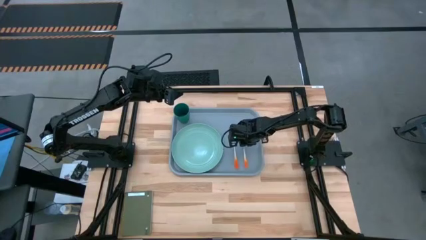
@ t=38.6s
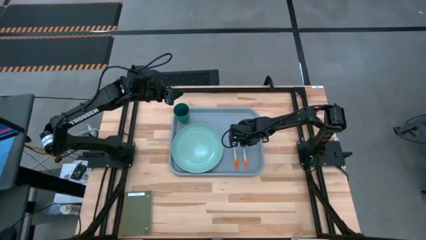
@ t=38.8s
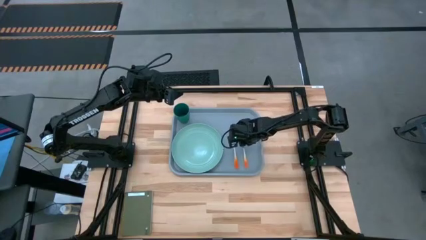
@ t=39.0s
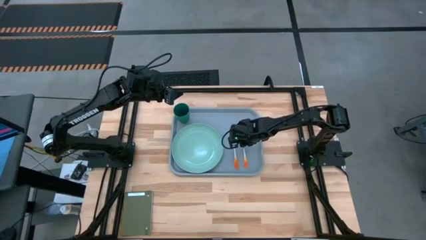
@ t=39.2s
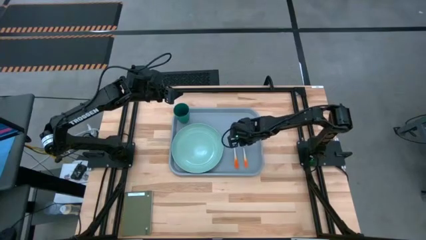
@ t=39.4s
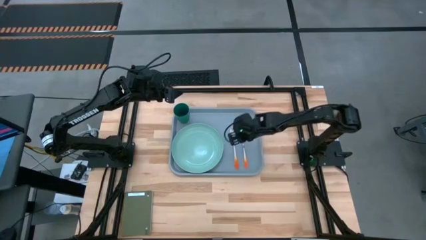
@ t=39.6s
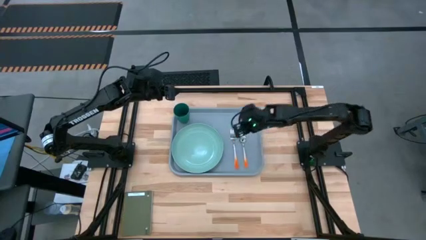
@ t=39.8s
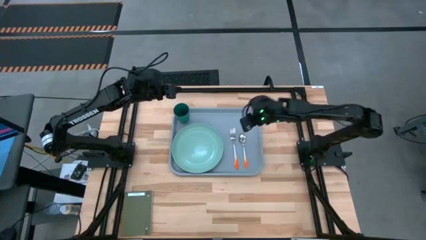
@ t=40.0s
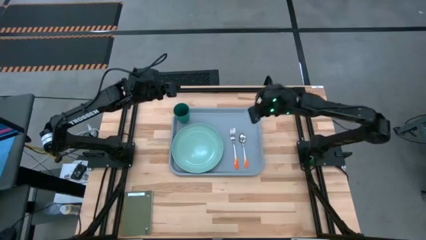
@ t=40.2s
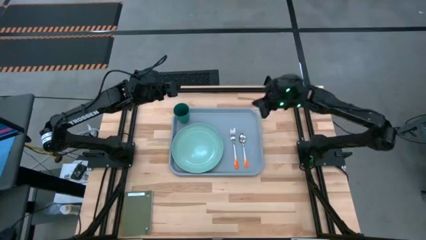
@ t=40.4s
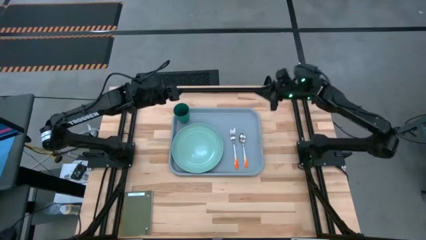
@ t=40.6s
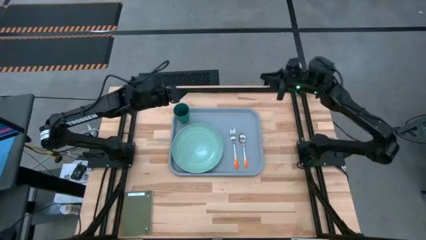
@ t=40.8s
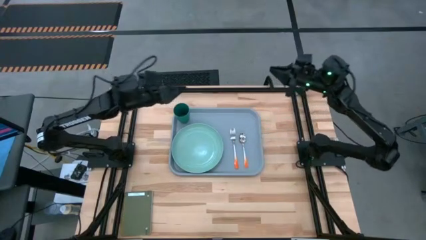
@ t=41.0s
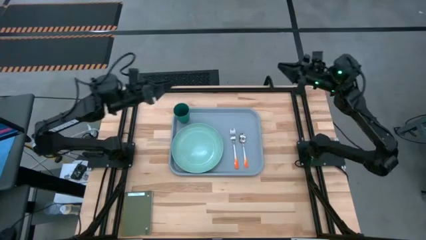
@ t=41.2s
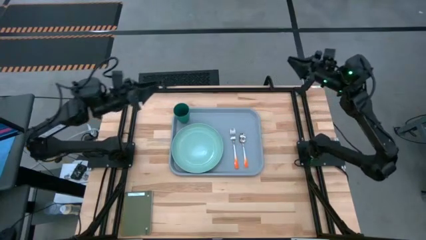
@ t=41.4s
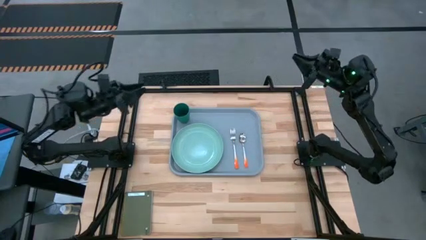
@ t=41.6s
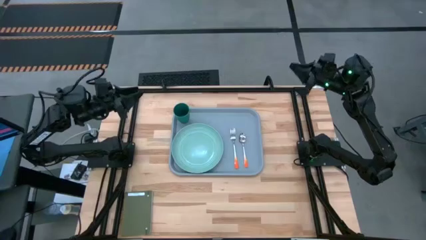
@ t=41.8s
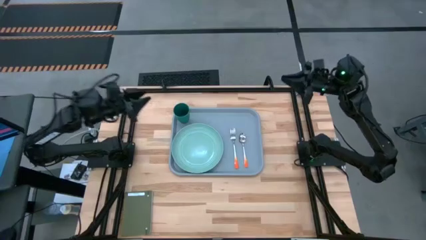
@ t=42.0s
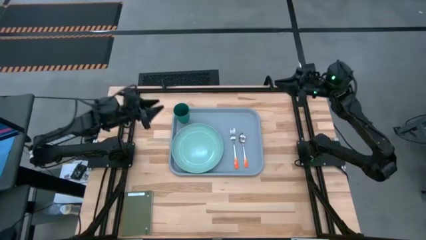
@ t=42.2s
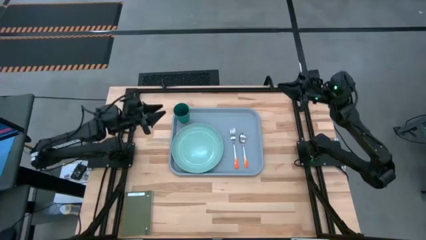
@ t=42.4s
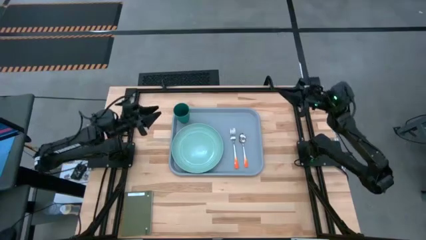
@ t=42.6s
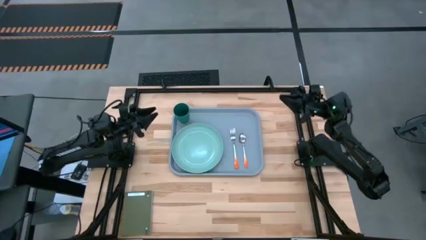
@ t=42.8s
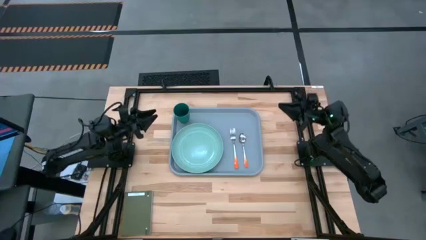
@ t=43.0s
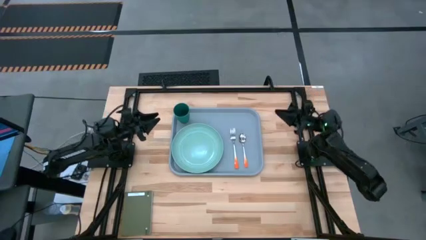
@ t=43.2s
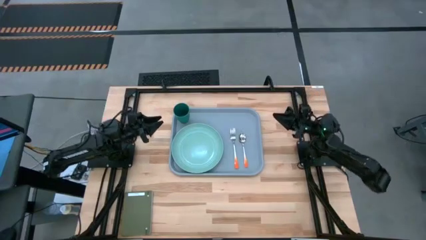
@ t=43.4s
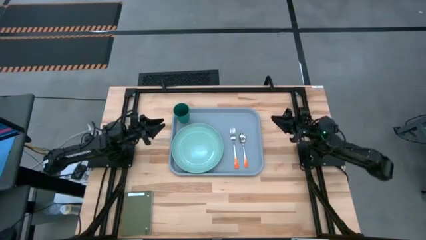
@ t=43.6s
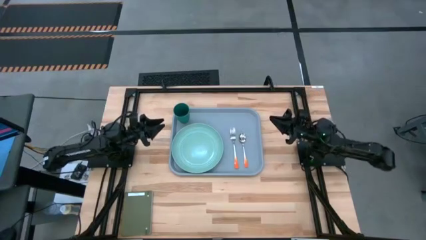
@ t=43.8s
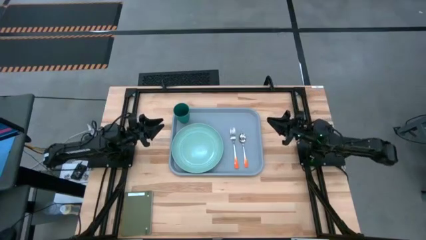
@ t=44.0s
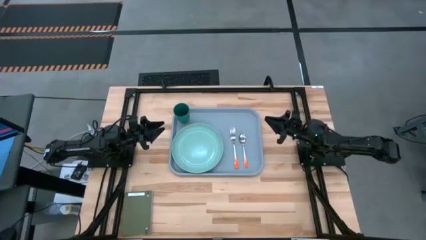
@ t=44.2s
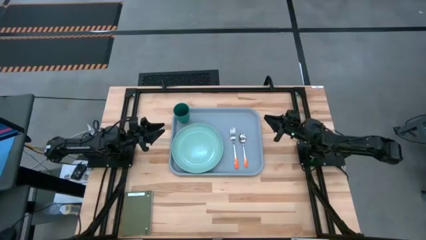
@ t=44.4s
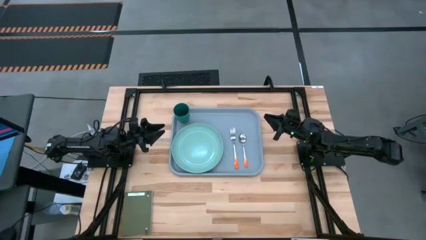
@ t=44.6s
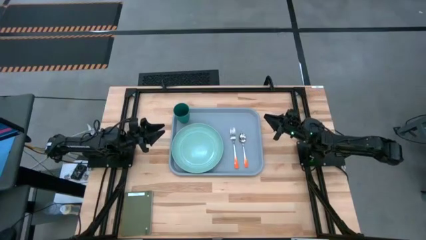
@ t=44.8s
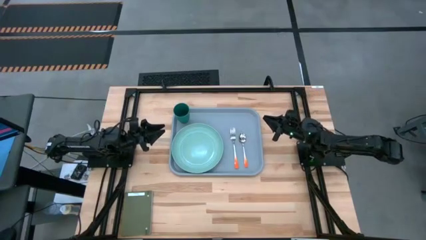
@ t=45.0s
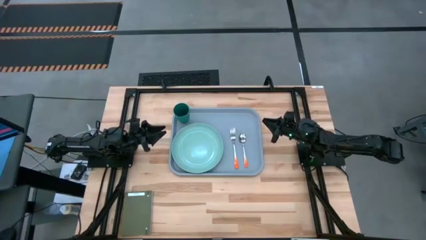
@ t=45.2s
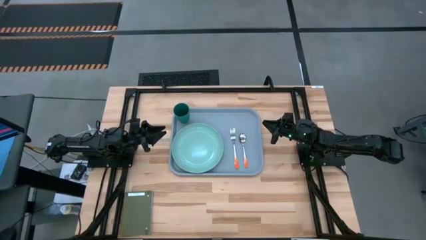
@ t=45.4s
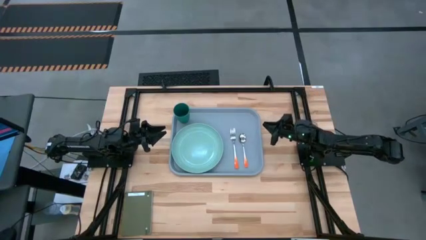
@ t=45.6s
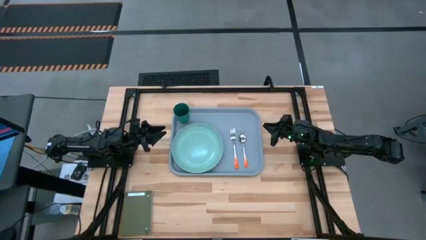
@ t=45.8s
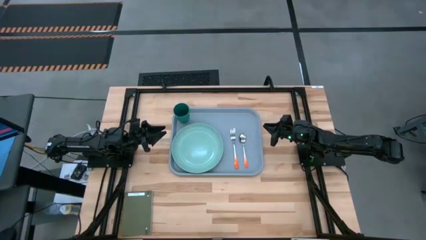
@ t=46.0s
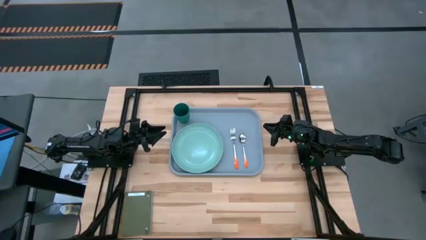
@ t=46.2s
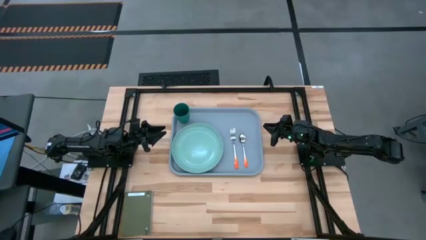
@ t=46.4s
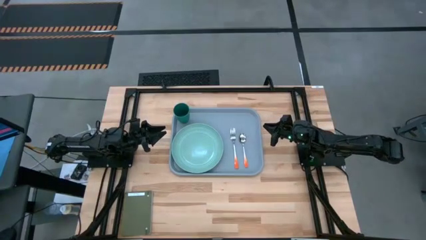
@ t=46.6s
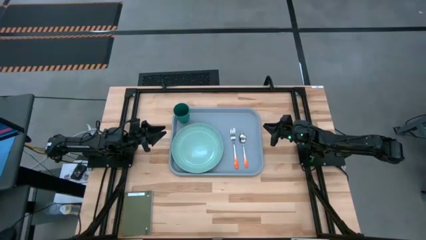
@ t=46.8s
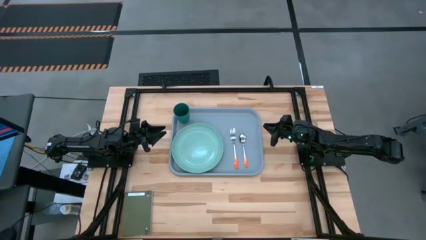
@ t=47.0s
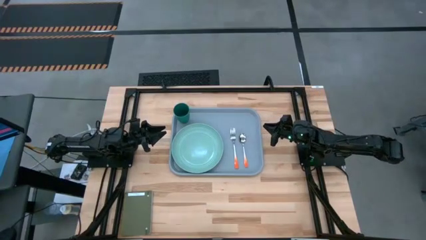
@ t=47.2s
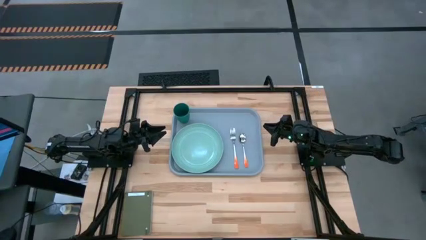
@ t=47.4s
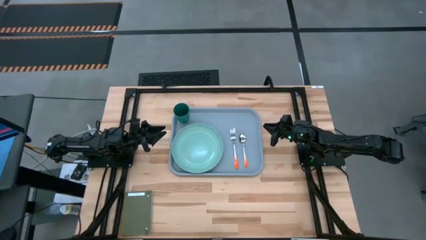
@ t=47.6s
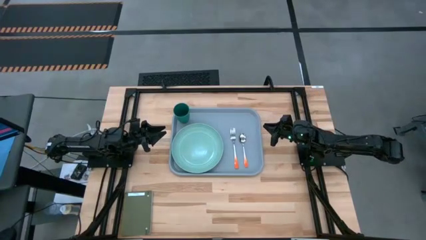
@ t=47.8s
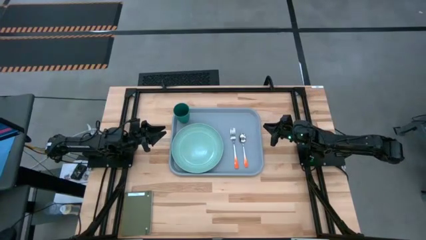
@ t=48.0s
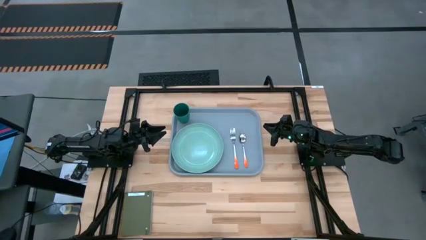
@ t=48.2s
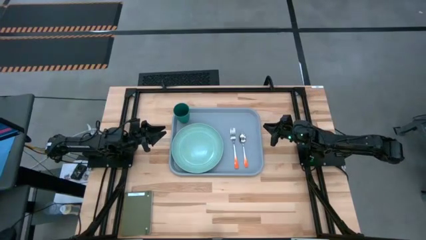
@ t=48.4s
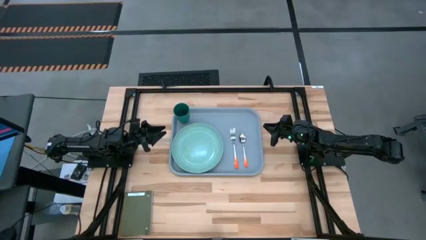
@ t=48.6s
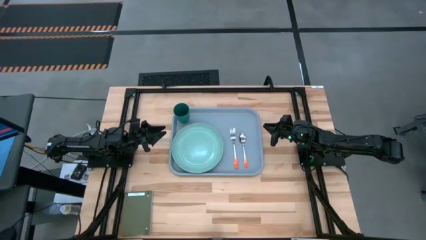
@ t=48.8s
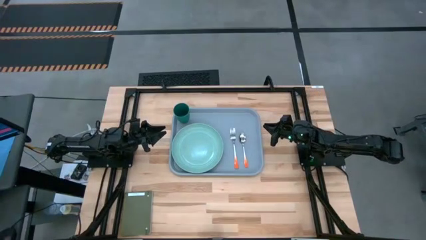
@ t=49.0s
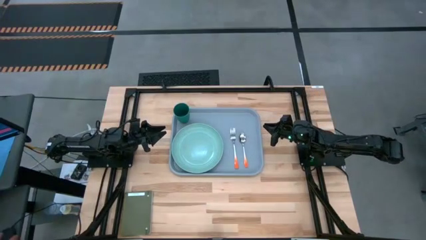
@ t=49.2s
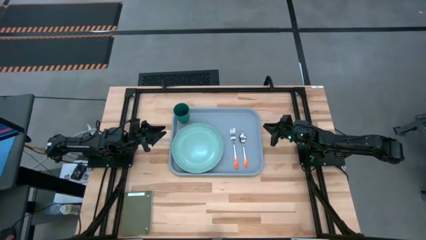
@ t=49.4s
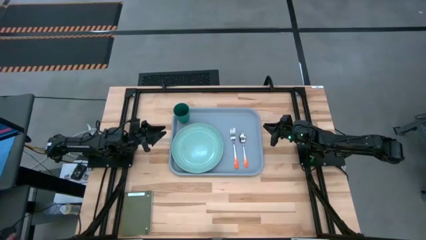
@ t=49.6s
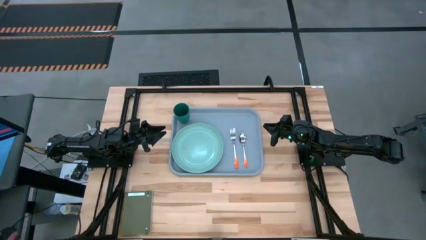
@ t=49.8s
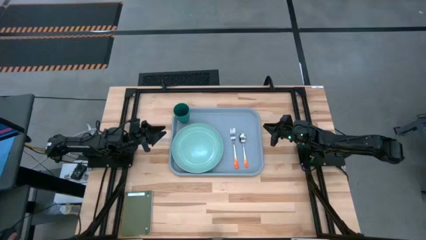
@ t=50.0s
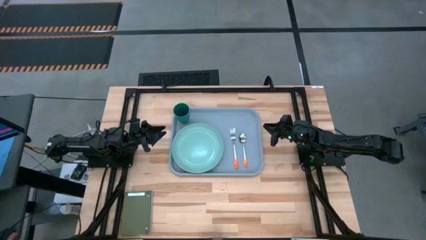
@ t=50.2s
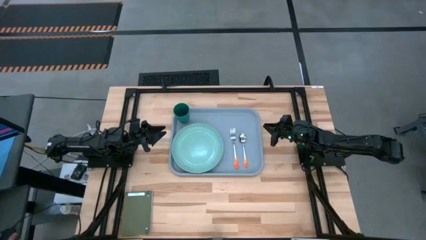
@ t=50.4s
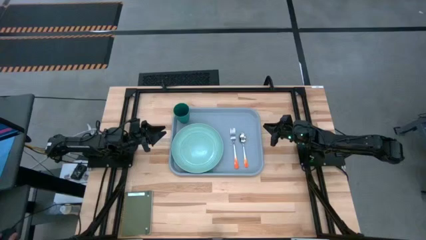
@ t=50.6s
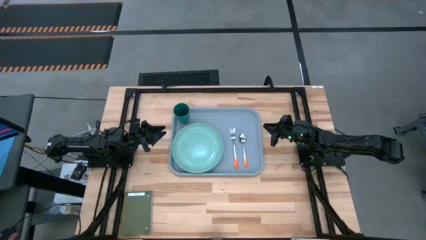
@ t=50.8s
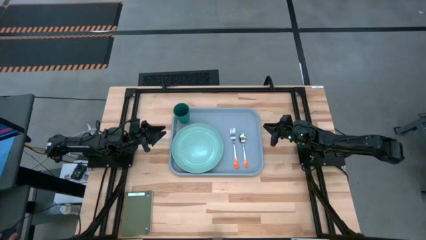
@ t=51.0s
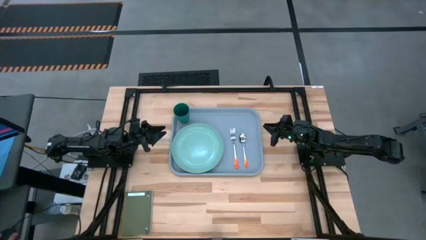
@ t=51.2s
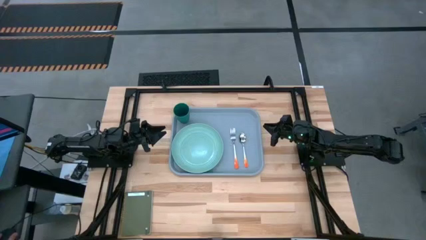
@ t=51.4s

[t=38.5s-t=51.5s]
Task: Pick and place plate/cup/fork/spoon on tray
Return to Home Position

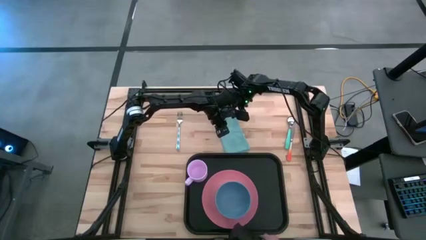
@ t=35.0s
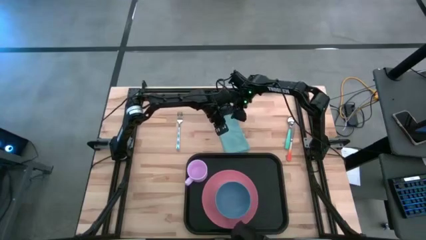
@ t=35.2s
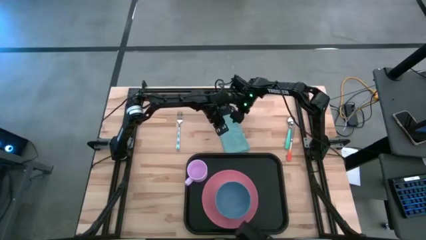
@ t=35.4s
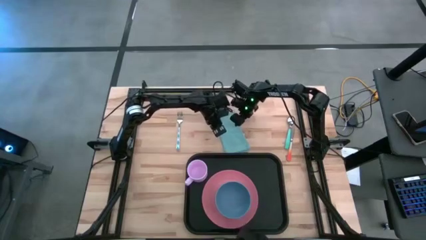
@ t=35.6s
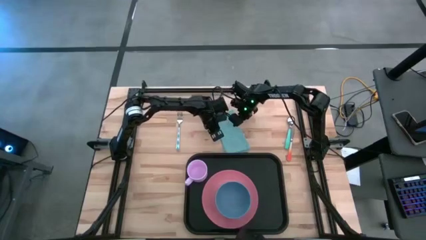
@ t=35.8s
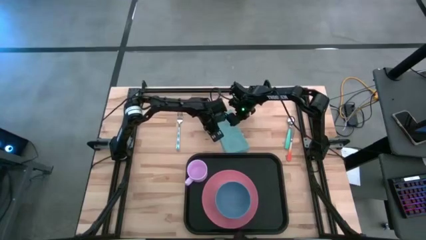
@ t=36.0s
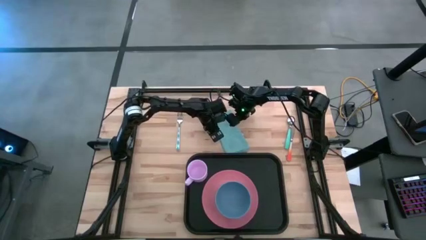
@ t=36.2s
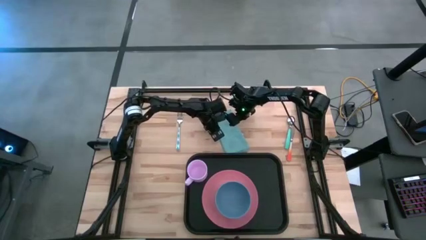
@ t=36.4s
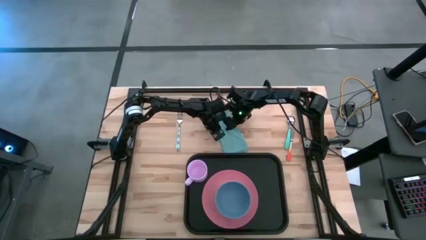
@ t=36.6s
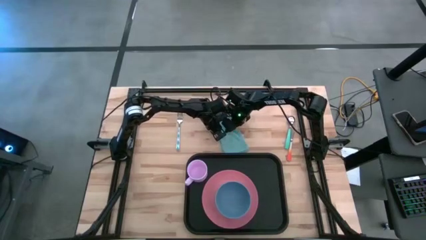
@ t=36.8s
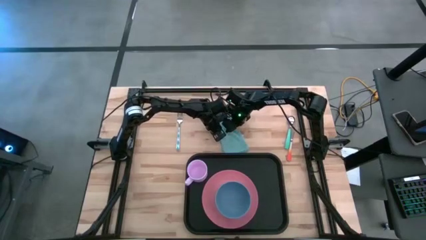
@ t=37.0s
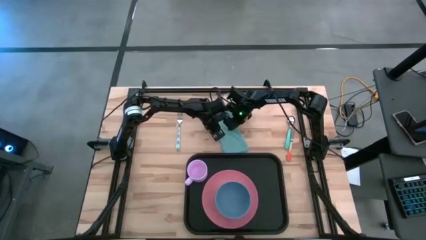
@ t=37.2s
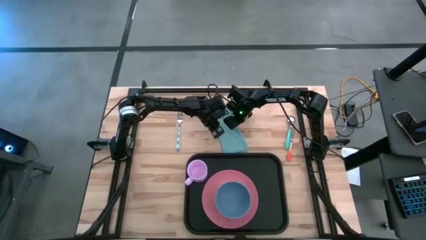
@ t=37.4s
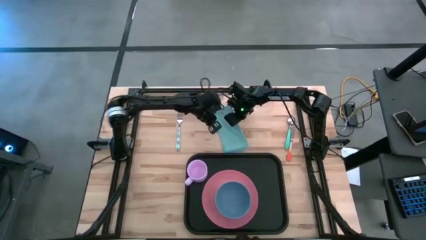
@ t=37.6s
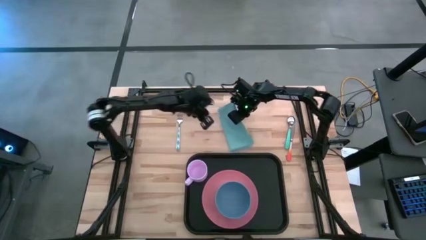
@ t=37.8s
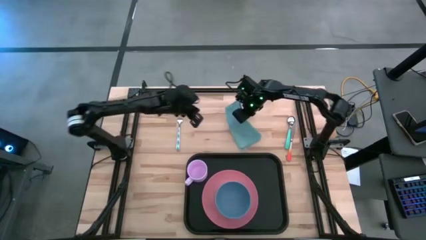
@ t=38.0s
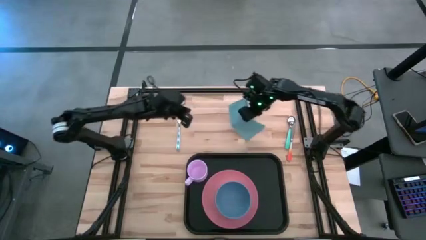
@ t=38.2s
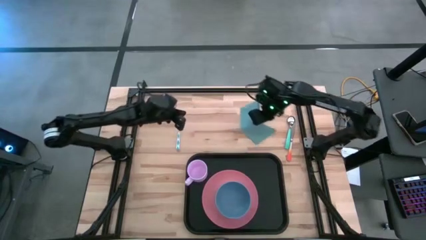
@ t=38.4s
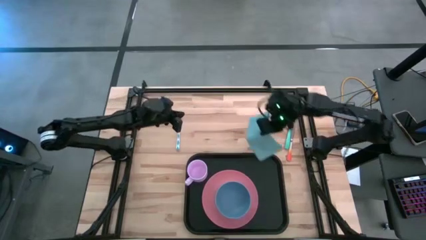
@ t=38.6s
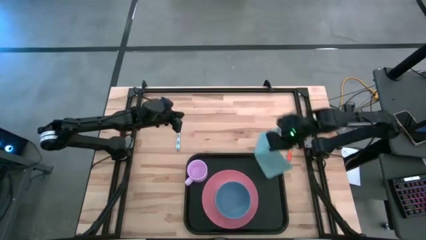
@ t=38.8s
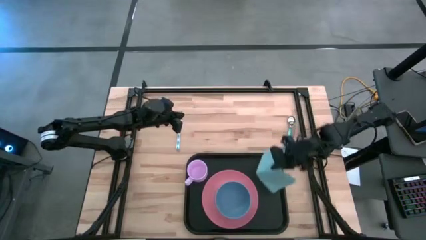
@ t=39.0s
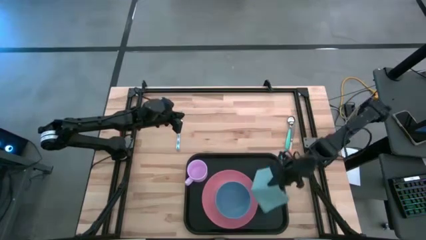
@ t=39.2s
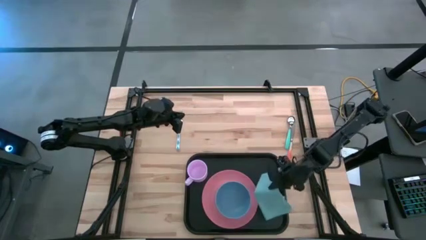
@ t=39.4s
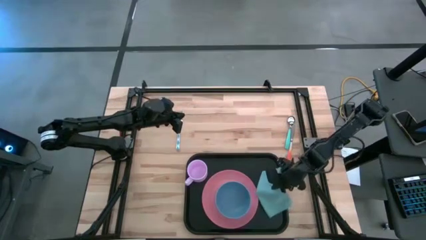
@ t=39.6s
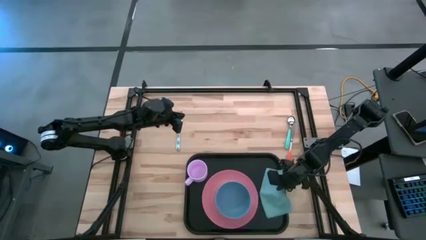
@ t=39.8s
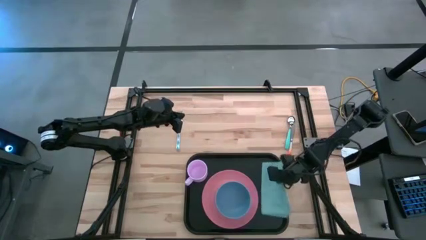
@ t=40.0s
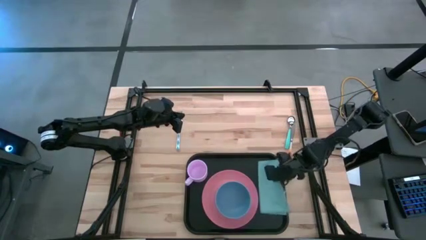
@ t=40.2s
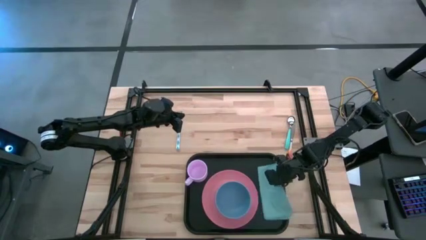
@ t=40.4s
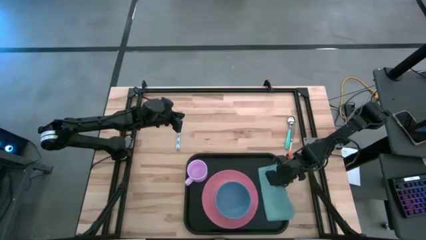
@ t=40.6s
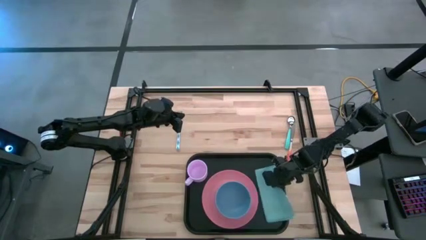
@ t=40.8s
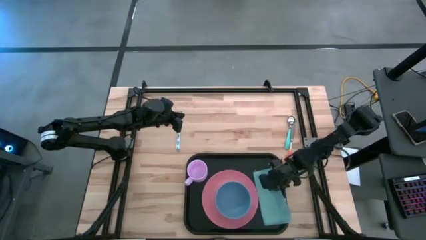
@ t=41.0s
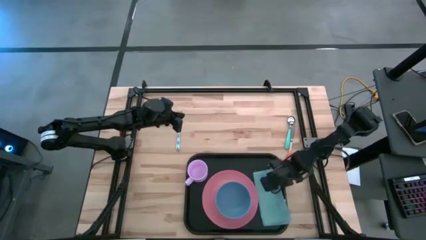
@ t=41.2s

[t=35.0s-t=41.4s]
Task: Set up tray
Put the blue napkin on the black serving tray to the right of the pink plate
